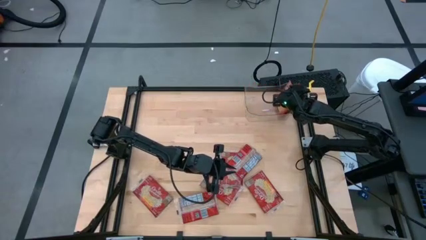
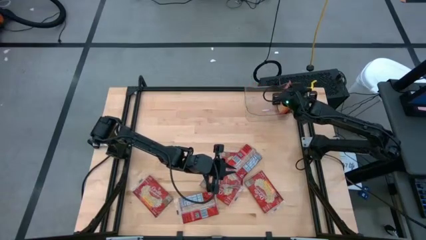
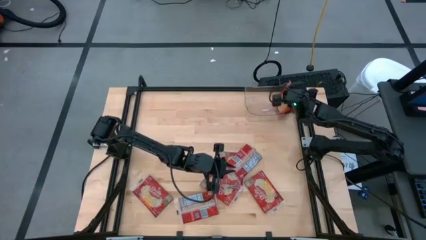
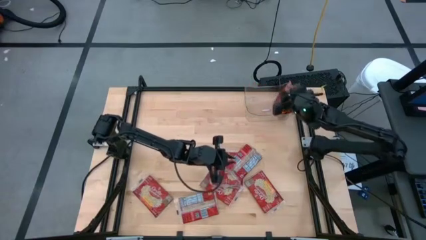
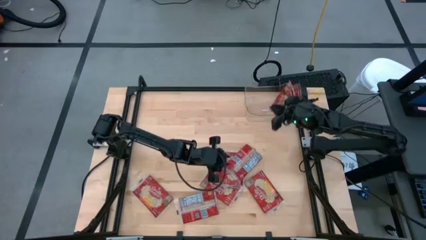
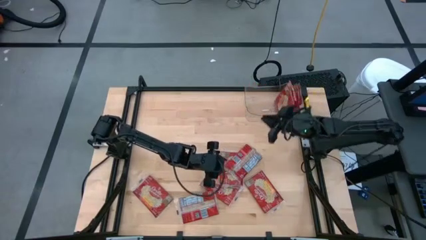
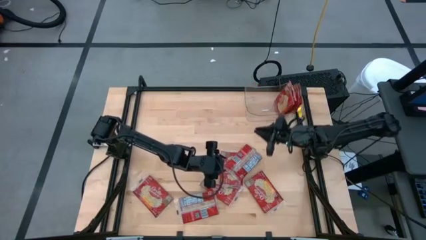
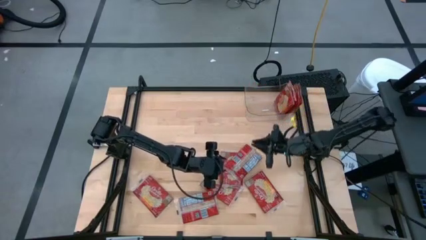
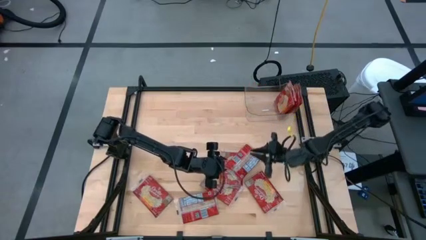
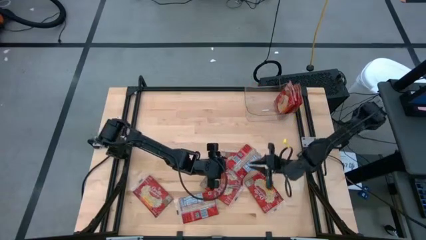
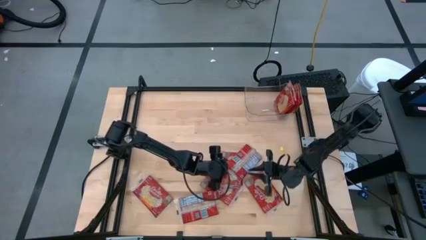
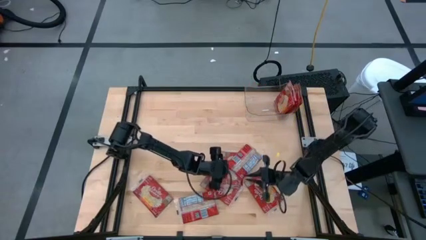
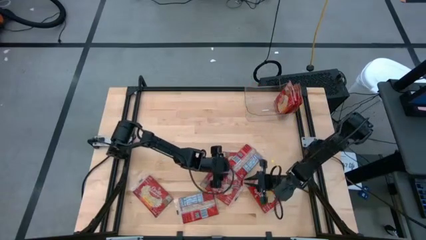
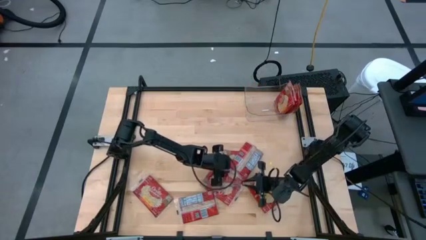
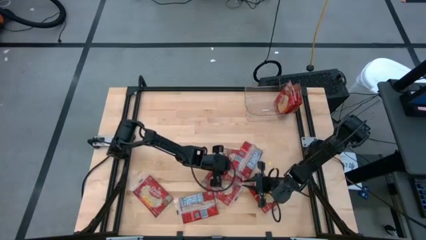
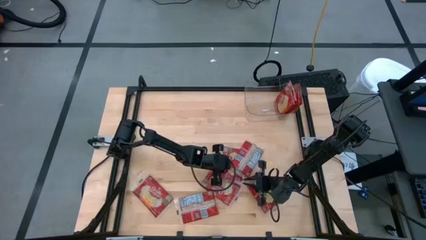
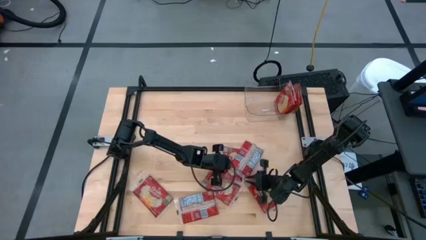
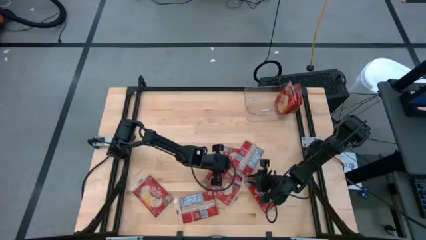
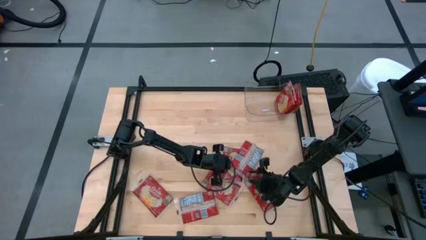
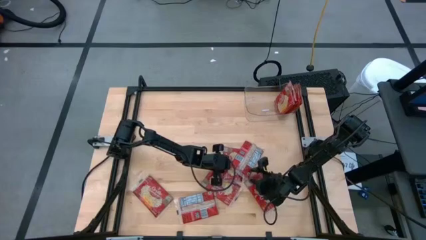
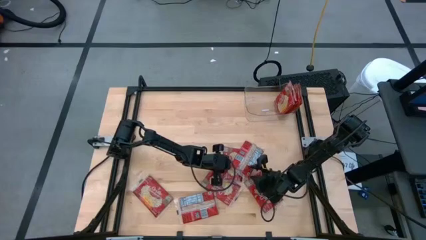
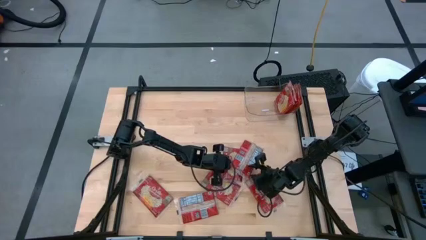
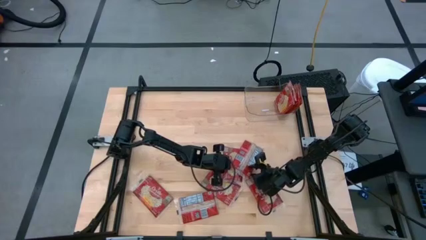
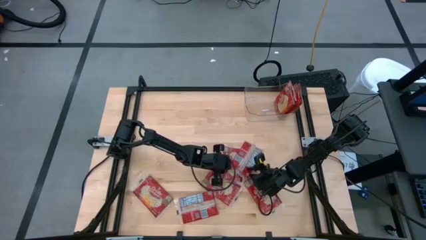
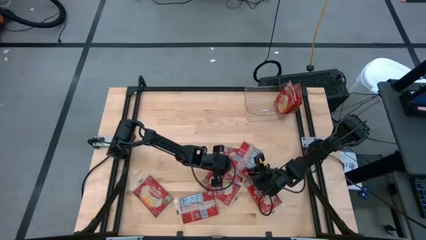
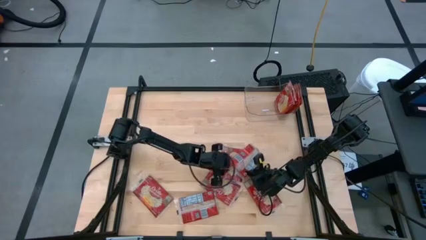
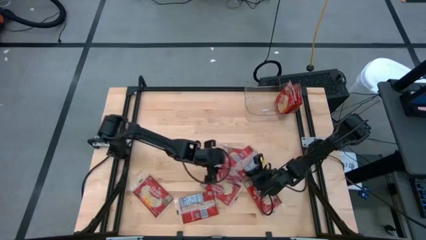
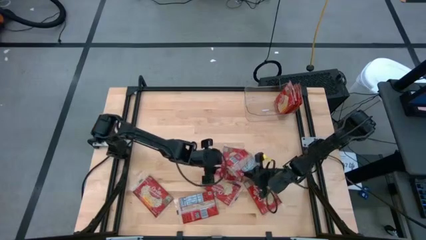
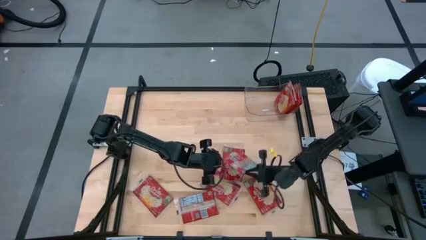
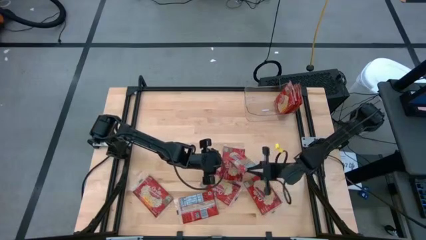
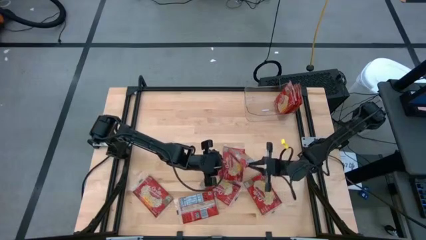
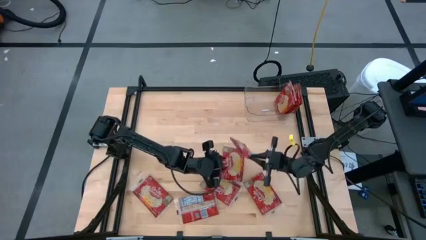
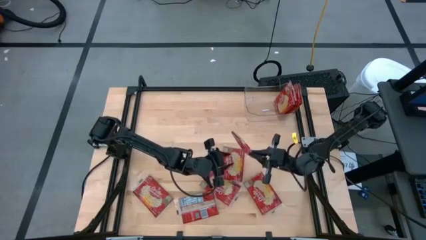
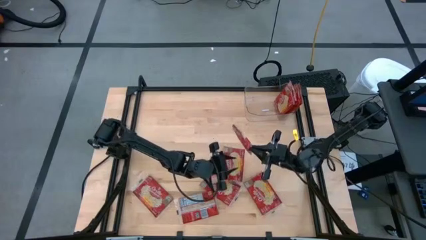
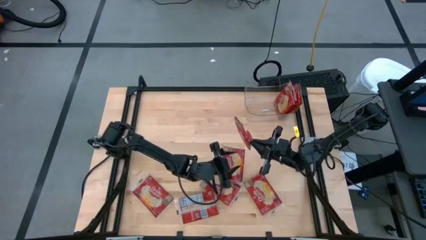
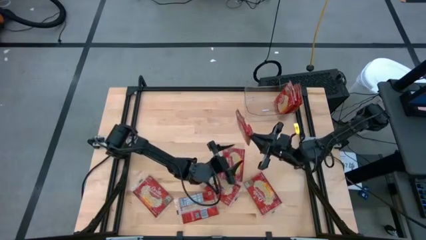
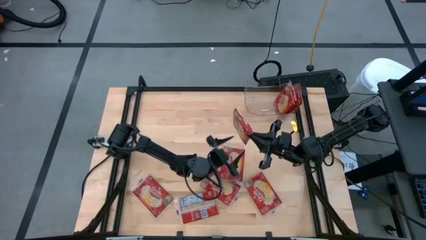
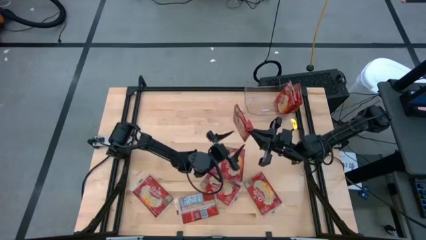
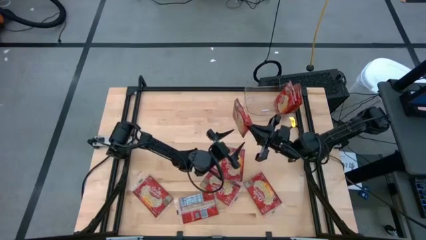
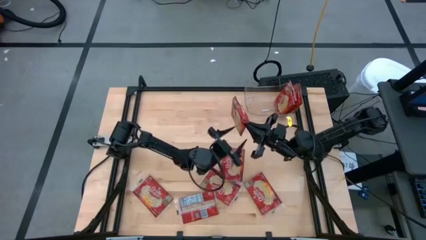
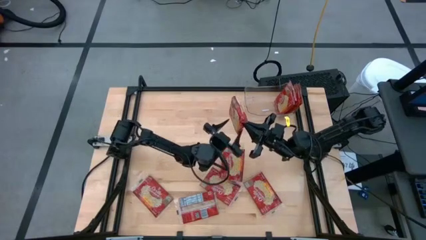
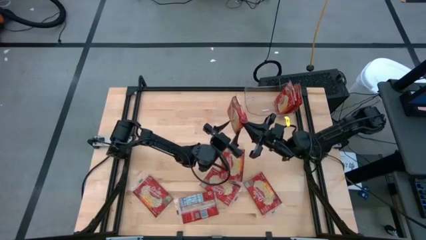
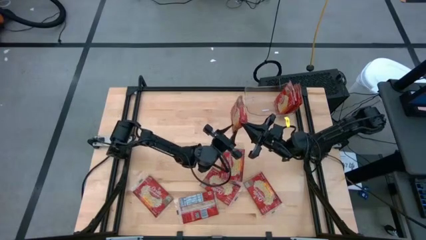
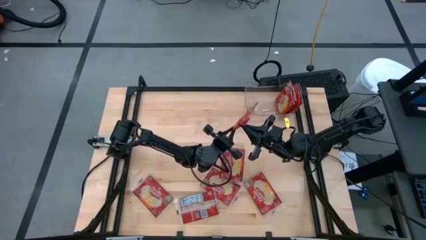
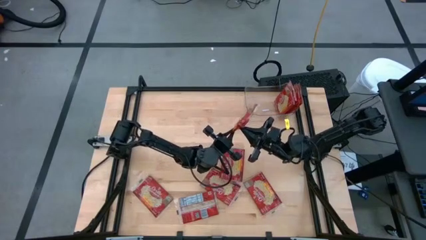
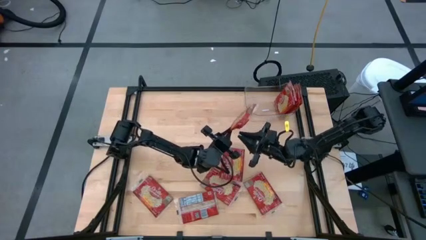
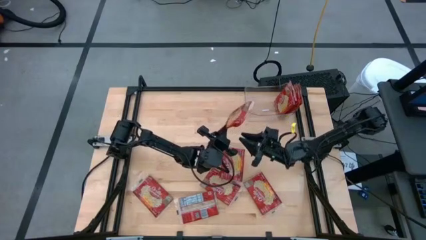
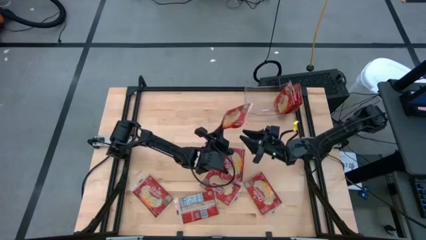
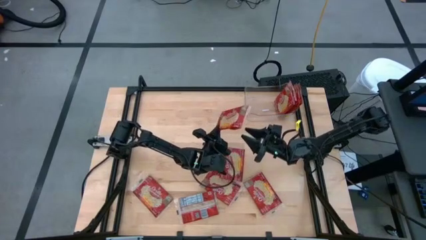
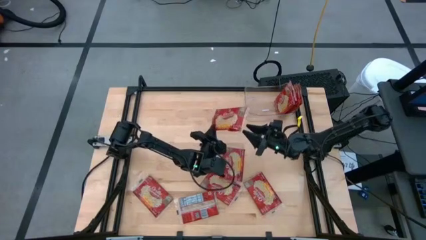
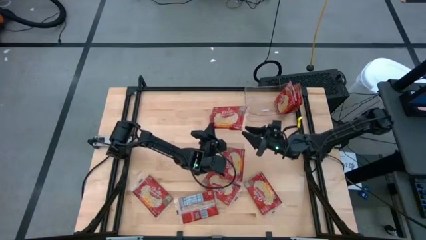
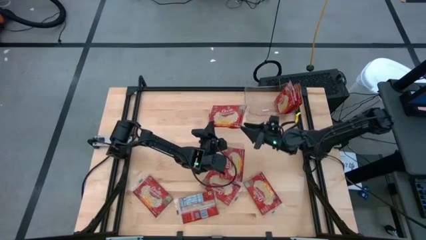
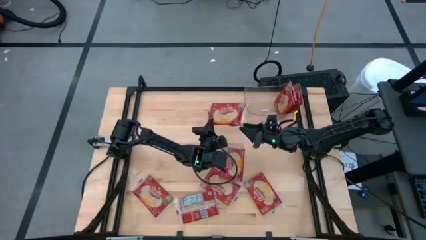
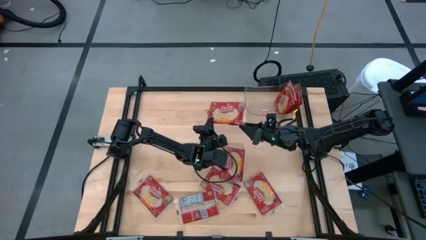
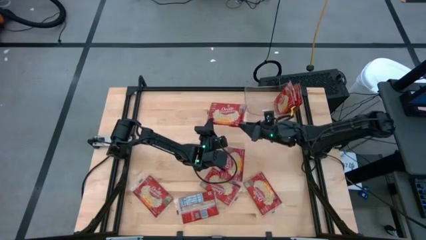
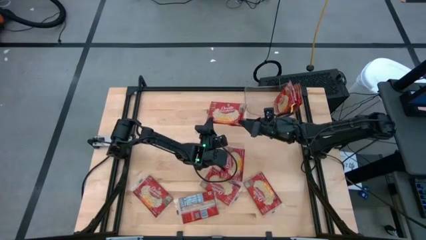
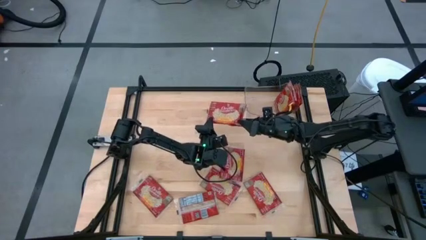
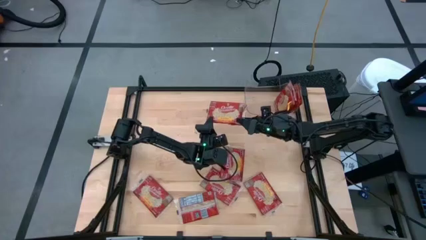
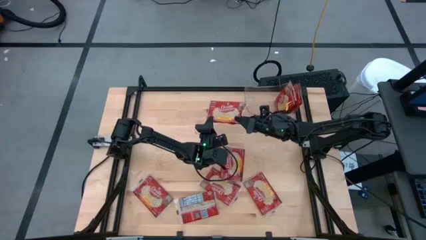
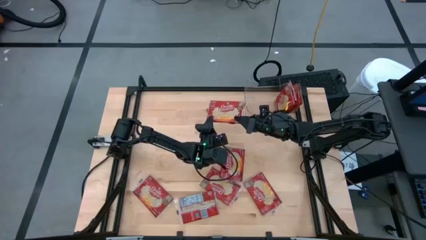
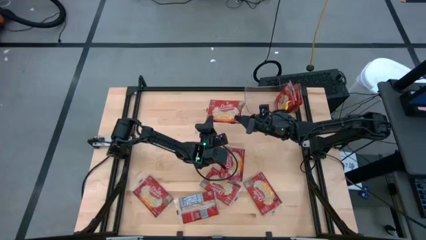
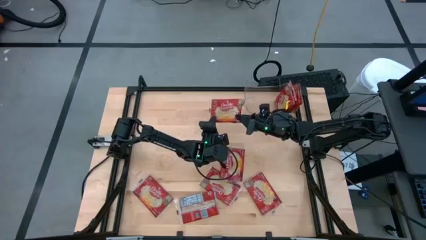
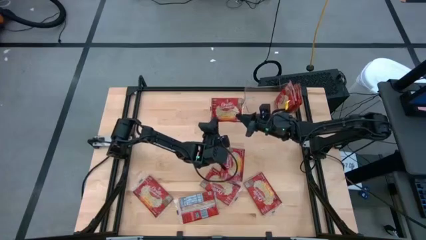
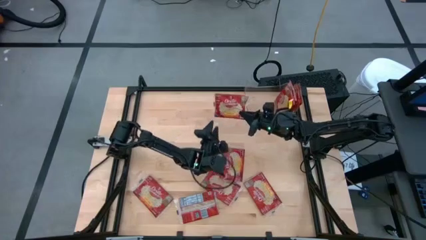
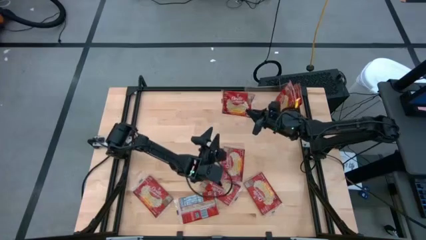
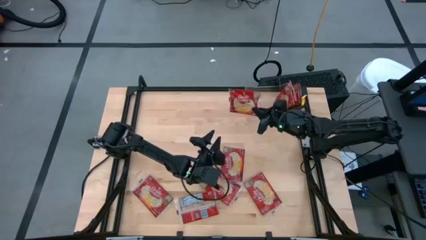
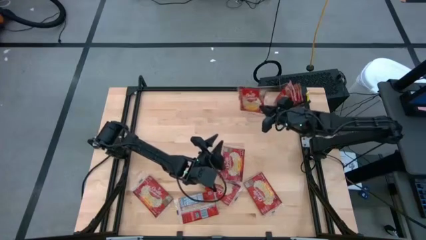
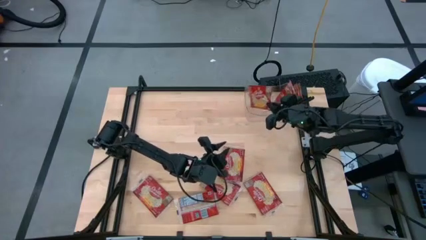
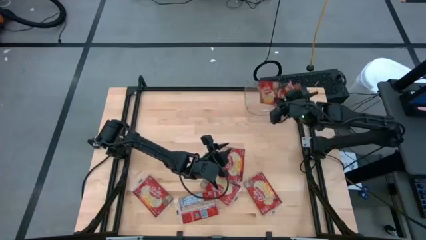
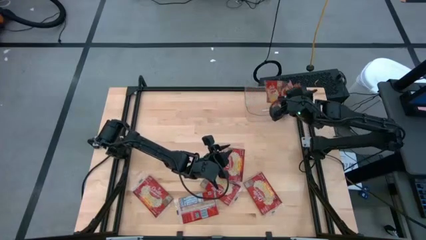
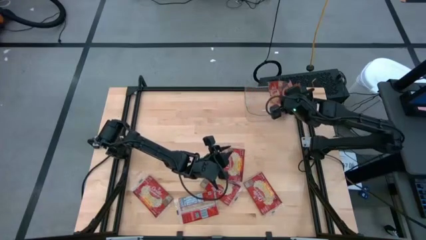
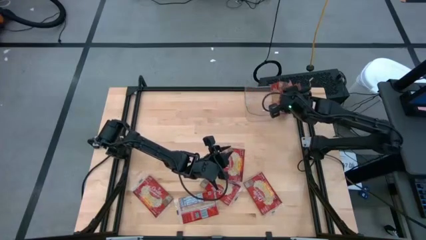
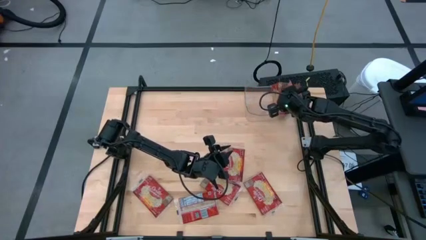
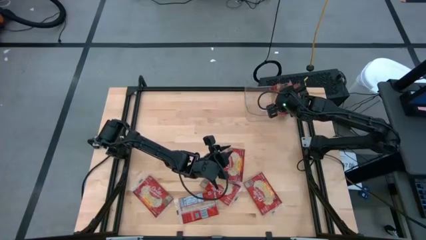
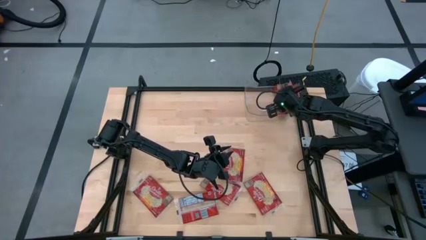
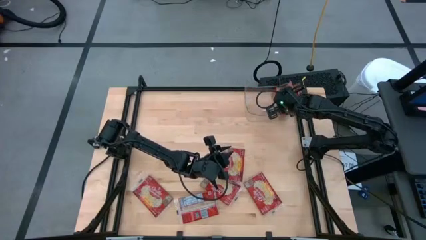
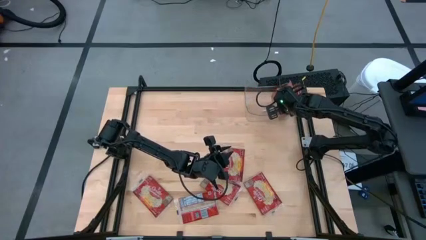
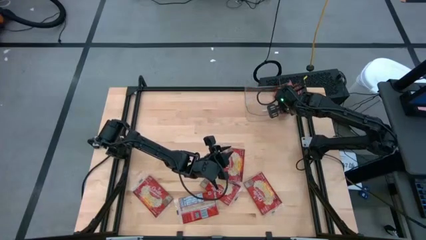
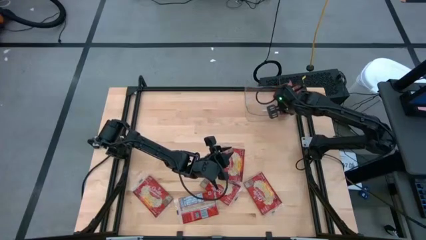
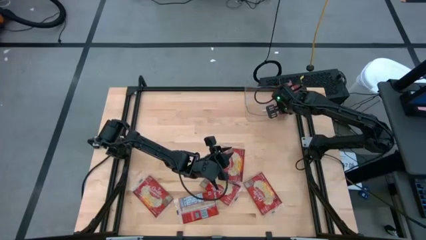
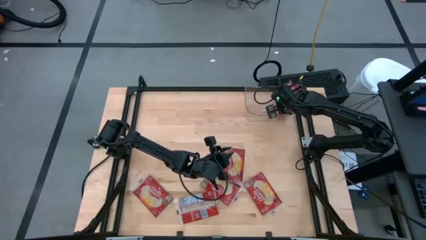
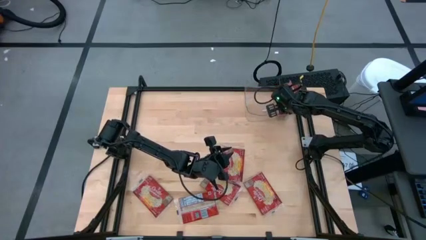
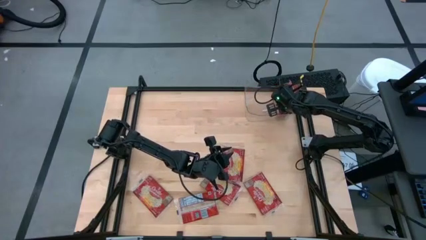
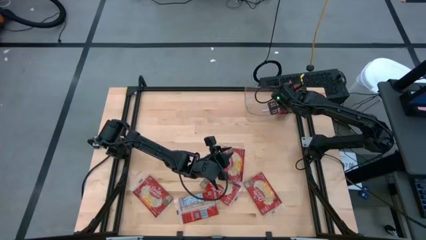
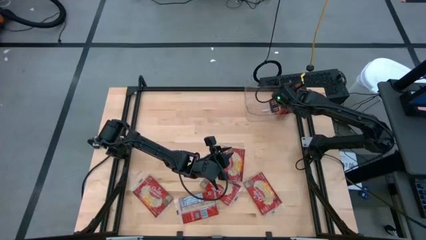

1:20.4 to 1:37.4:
Task: Sort popcorn bags into baskets
Put the red popcorn bag into the transparent bin
